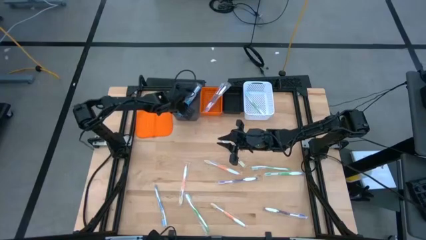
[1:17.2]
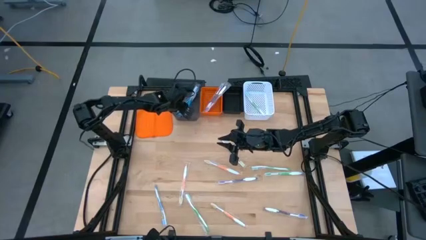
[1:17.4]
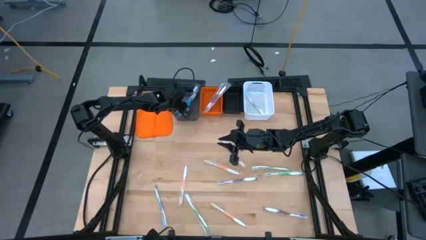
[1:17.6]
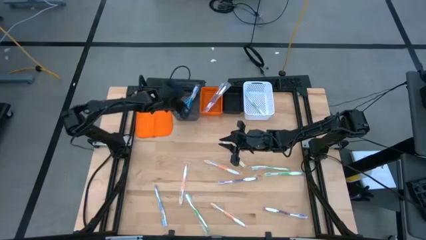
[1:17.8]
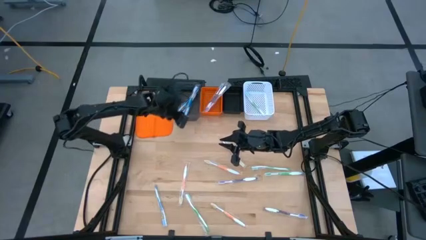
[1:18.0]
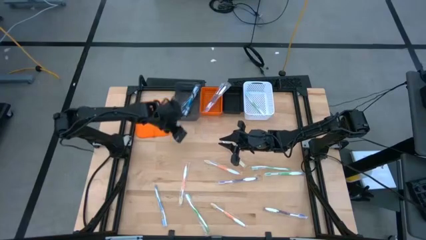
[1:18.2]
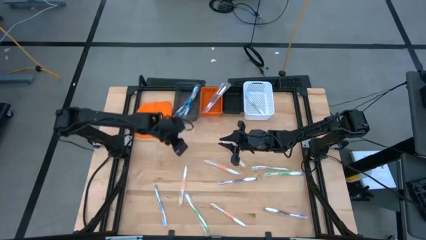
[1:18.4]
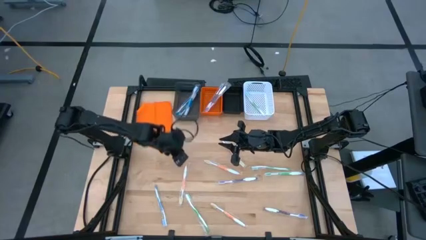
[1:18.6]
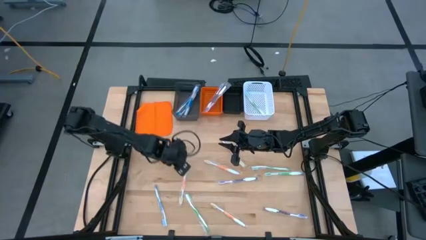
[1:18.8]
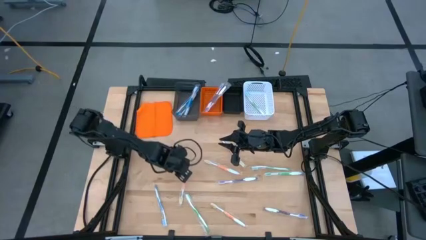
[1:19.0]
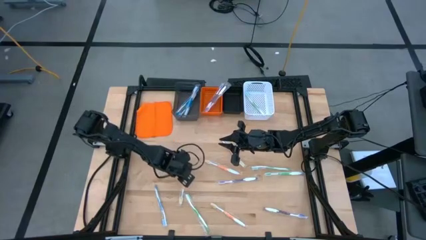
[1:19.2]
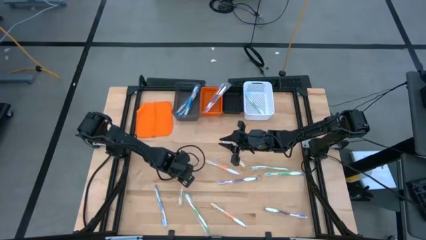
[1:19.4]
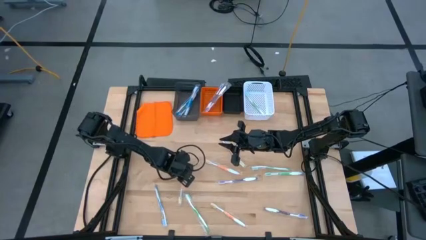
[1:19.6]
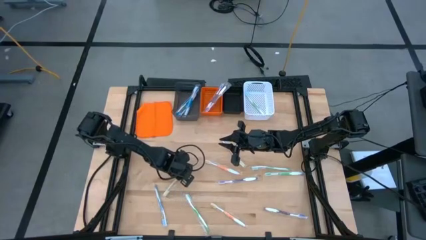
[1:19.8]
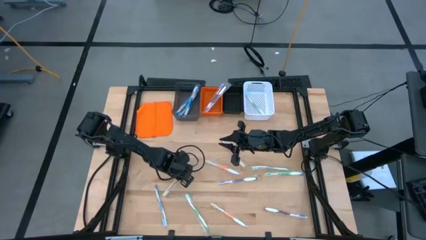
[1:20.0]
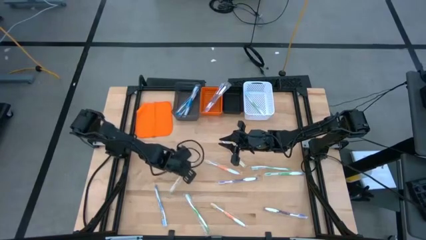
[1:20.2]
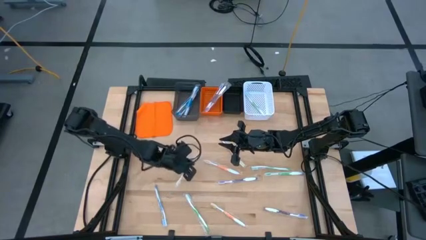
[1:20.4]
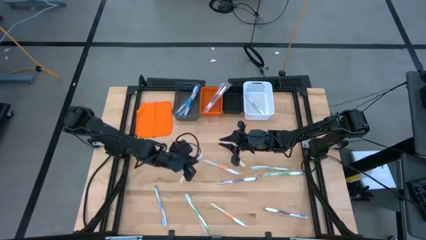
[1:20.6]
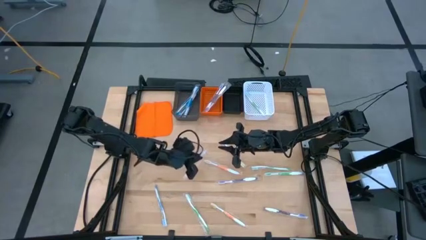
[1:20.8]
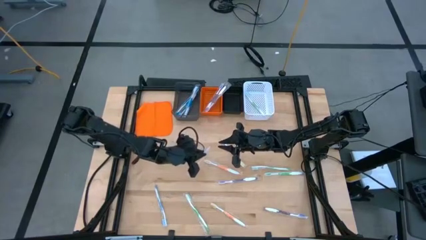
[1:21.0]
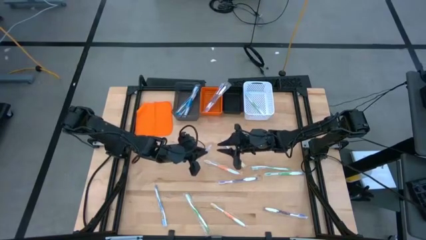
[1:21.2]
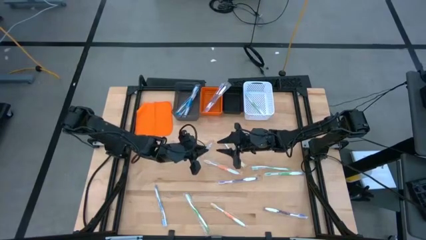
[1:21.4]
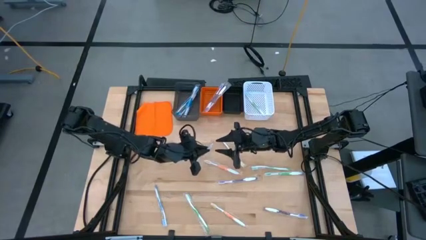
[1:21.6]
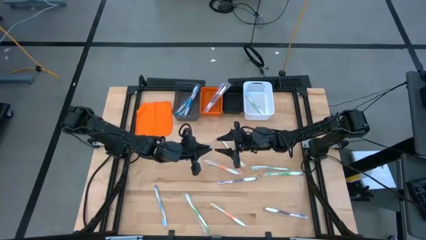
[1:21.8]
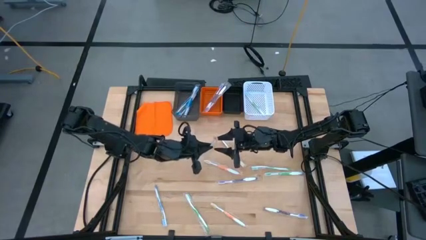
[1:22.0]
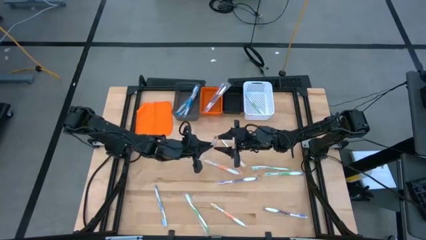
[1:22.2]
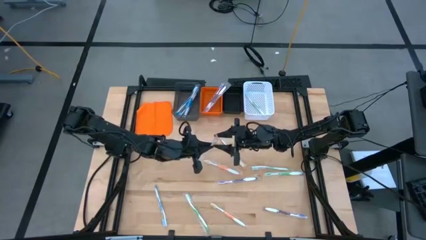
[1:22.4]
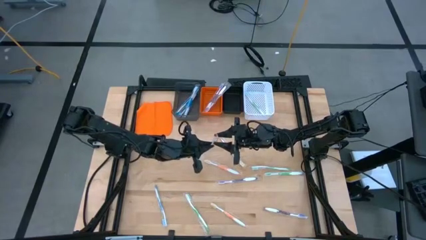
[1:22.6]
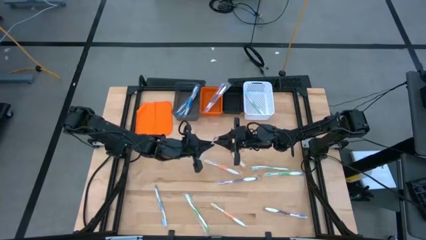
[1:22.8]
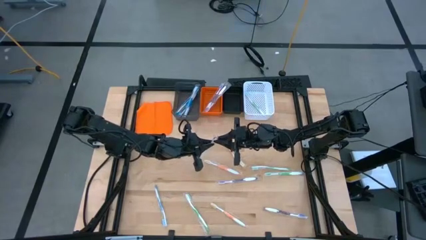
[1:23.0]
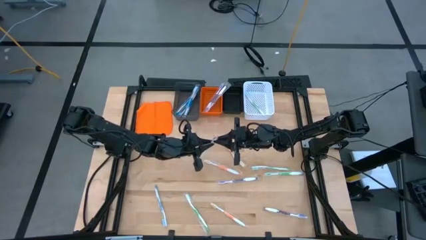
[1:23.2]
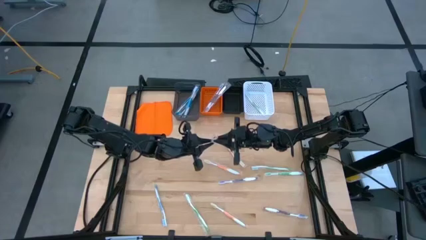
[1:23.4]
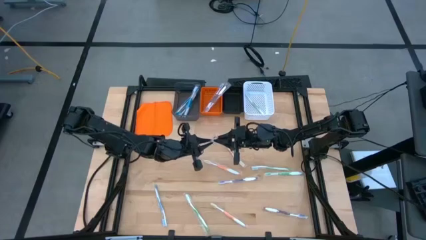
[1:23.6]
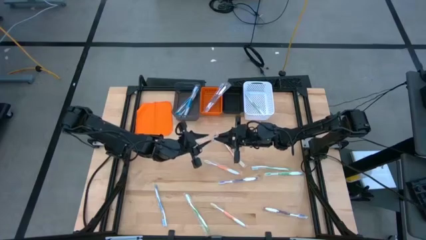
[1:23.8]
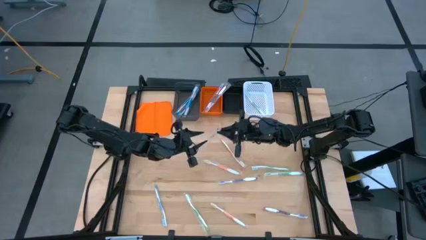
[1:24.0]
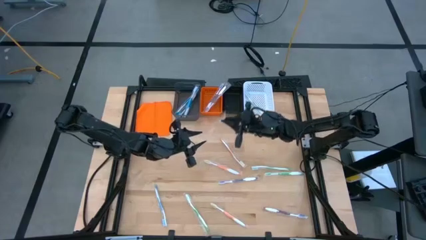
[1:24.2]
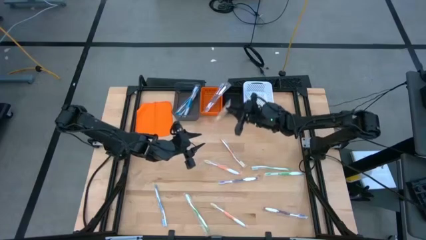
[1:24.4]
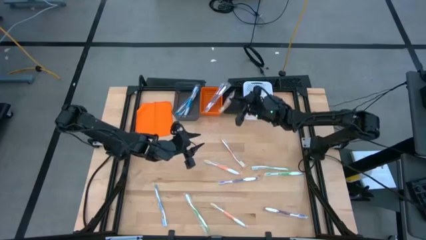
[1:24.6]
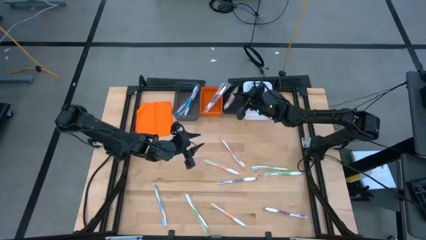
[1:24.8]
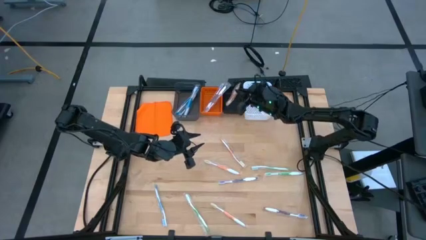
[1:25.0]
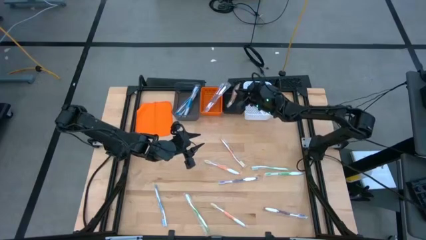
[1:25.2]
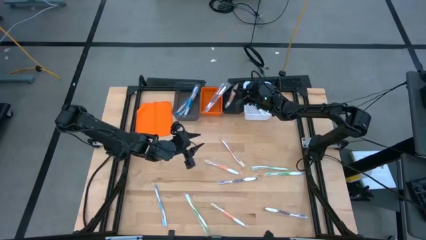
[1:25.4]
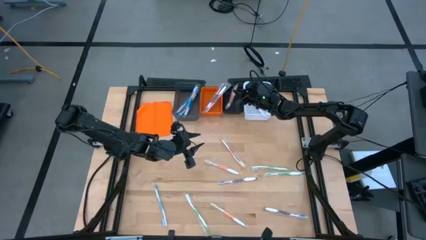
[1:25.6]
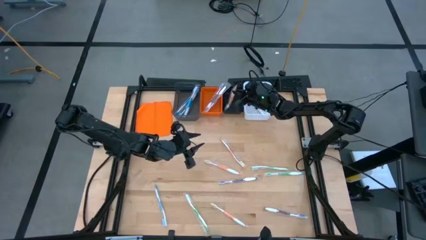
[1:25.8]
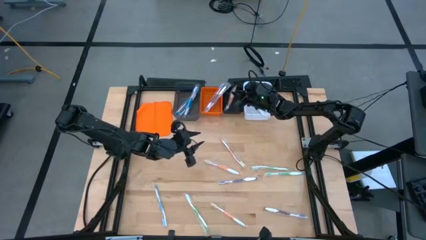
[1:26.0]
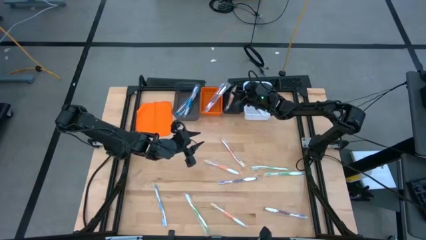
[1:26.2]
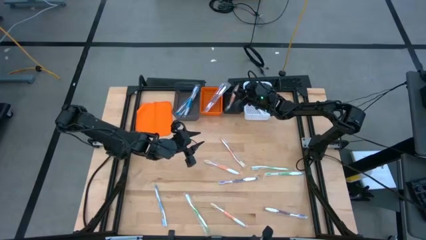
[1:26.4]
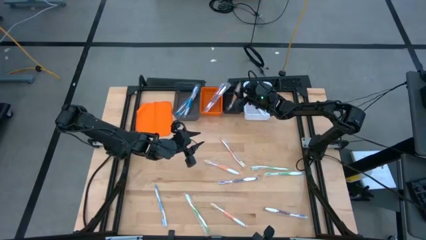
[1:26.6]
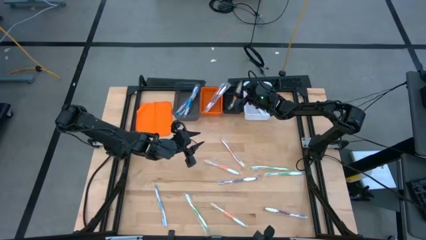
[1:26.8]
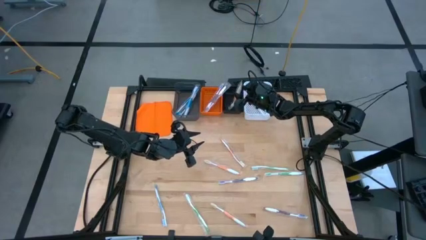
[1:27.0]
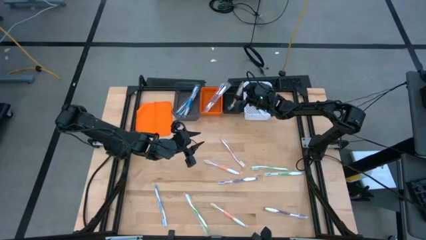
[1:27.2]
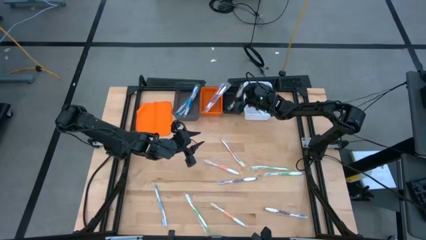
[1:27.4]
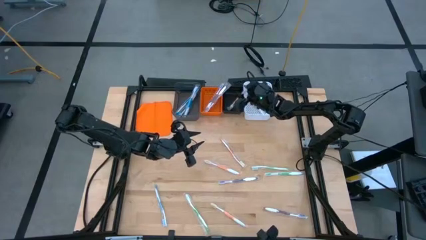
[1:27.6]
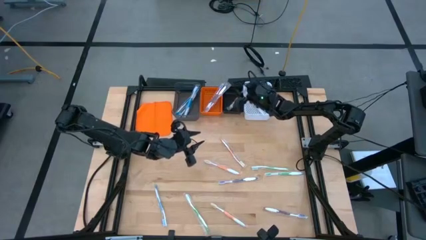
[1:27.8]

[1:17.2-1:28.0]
Task: Pick & Place Toothbrushes
Put the orange toothbrush into the black bin

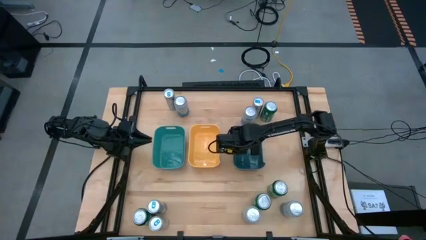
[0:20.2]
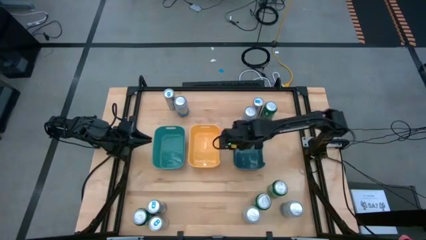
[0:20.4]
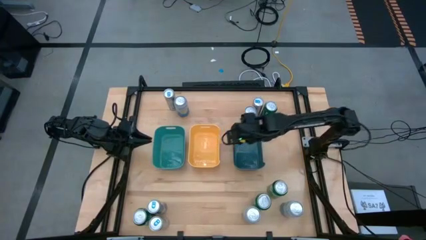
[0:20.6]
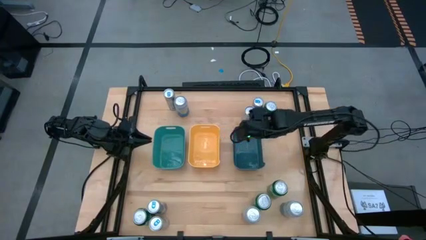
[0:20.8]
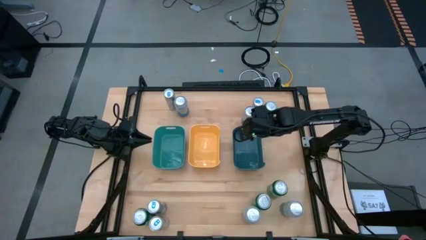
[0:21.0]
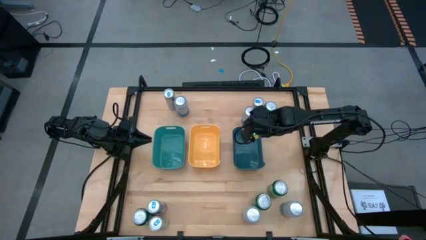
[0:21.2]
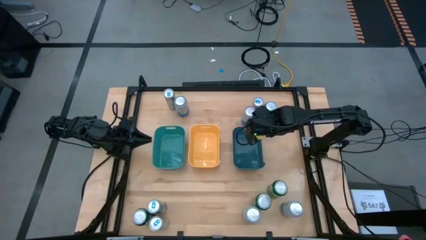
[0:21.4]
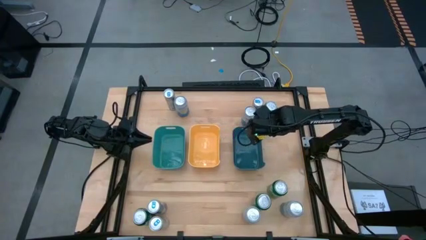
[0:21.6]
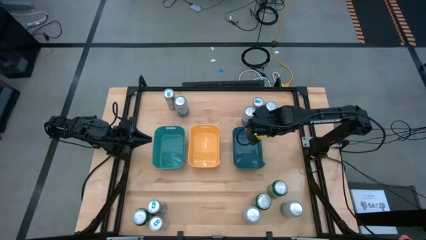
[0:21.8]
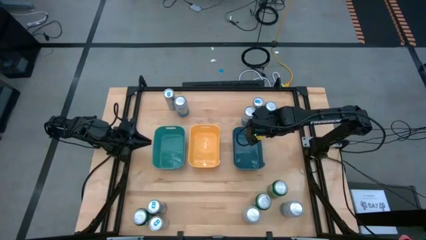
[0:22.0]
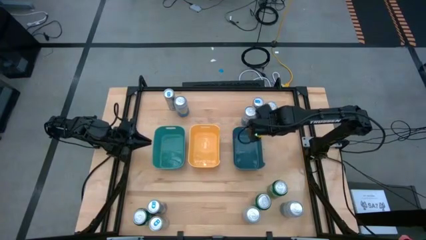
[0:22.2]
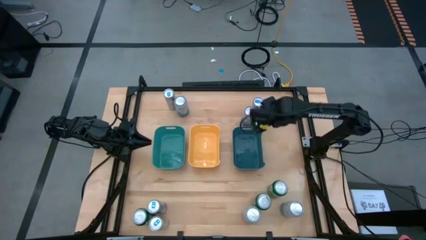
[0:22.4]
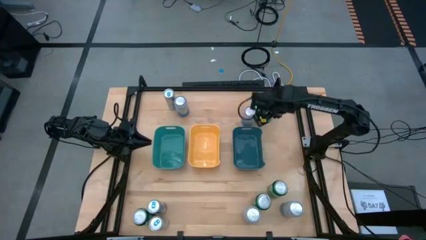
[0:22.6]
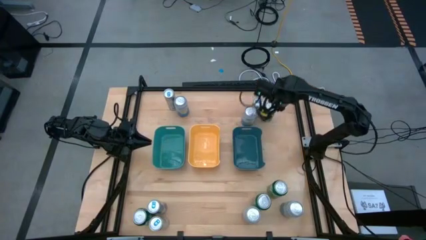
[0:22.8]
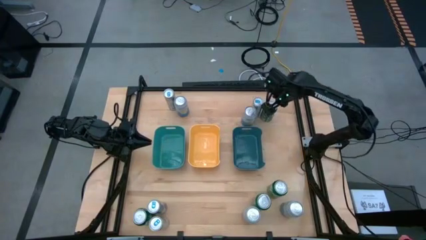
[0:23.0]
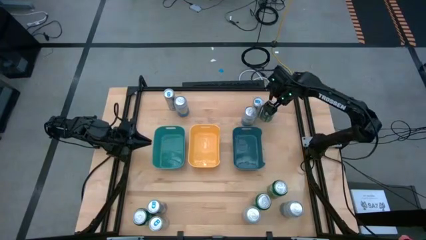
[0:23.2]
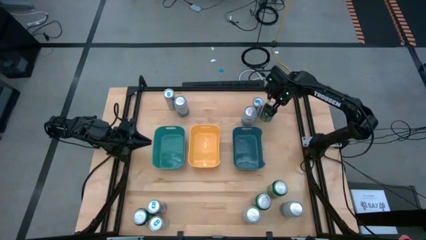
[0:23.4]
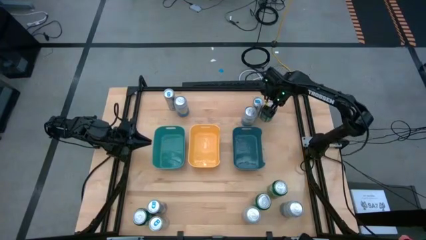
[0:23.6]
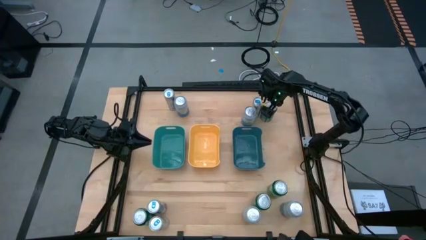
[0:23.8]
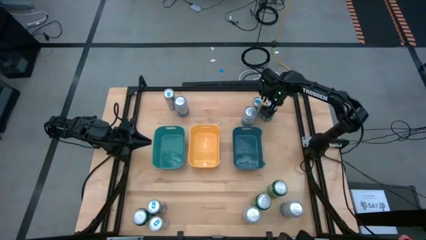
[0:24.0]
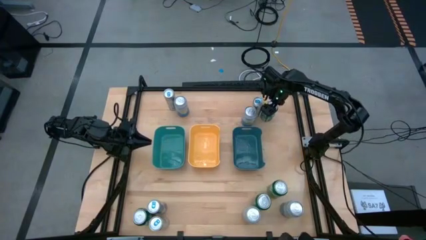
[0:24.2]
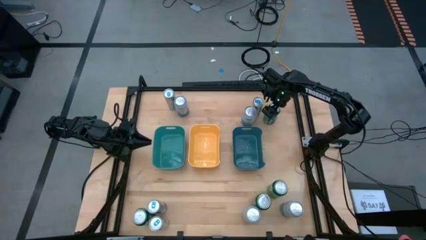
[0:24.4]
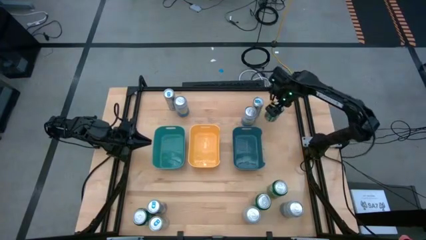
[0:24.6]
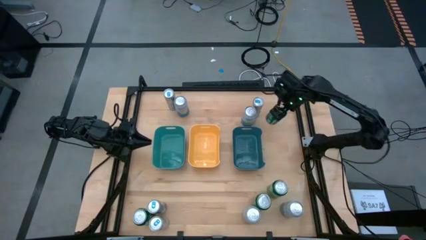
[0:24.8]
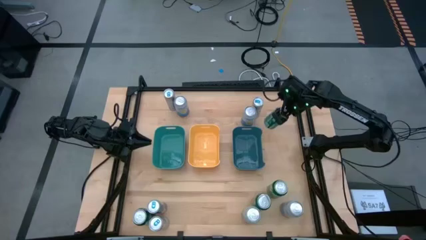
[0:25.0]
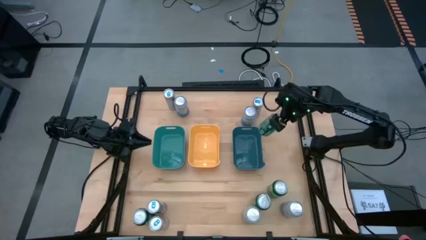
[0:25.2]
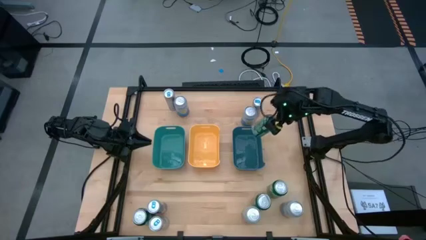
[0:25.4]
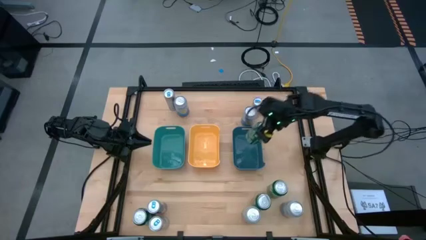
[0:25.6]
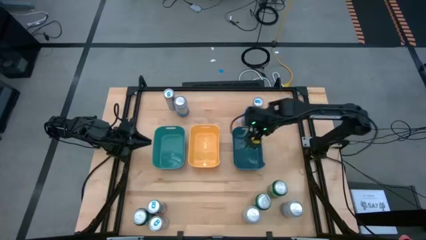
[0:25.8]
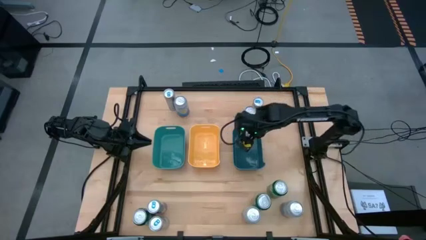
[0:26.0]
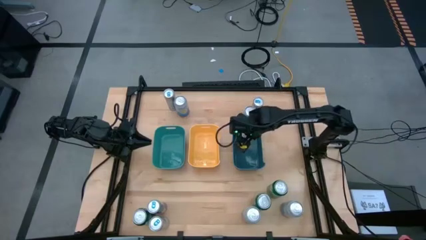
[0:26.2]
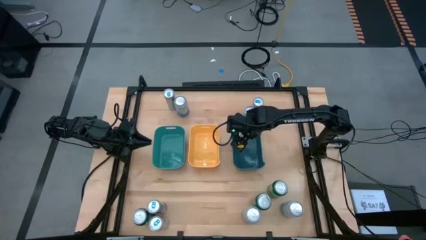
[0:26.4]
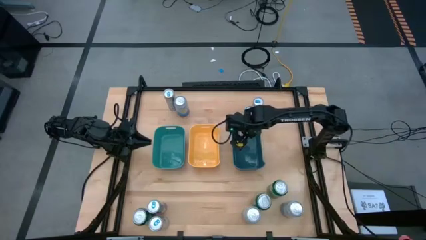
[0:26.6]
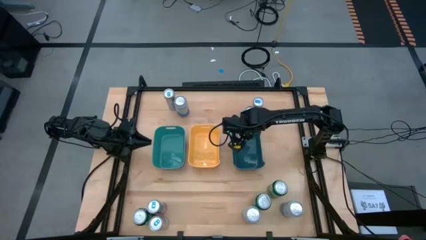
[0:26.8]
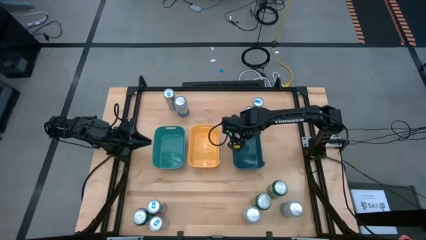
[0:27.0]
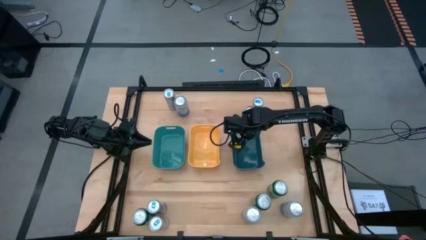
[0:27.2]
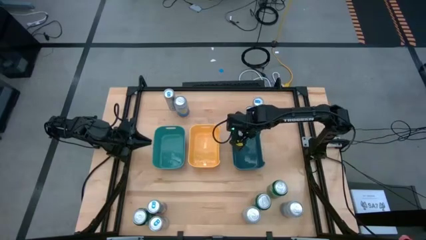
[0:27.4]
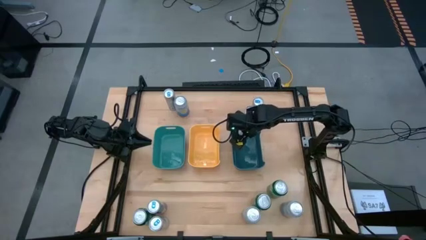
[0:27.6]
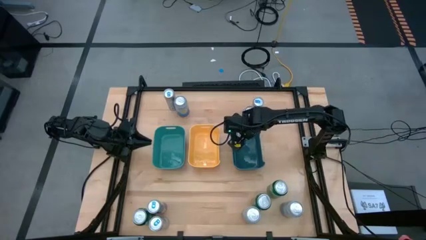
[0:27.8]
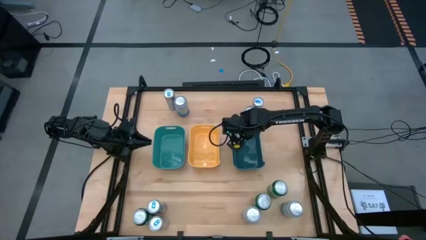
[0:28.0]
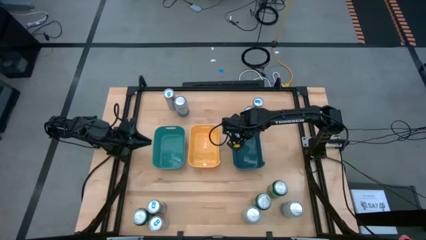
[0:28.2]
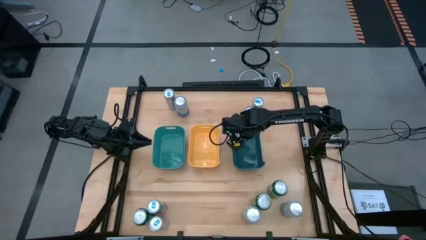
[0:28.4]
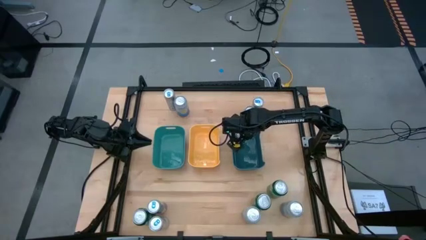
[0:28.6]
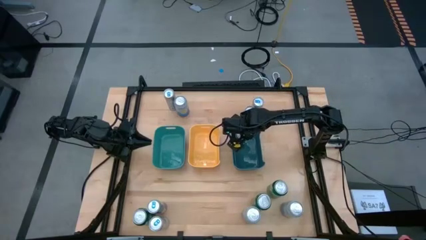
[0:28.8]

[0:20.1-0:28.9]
Task: Sort soda cans
Put the green soda can into the blue bin
